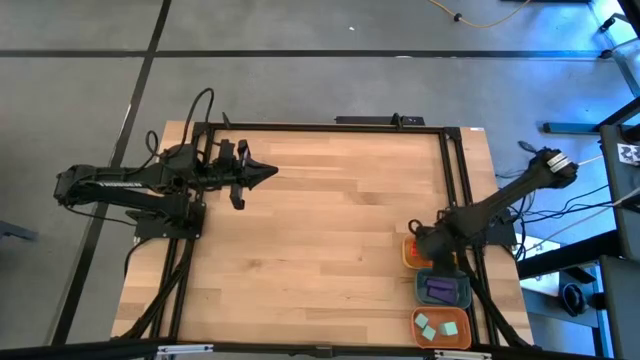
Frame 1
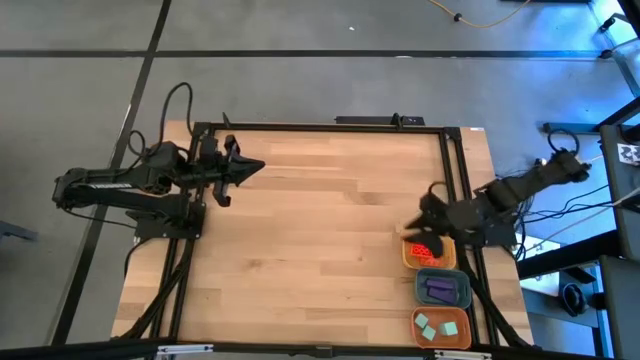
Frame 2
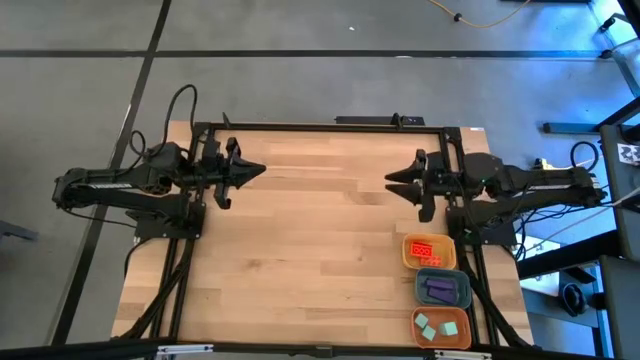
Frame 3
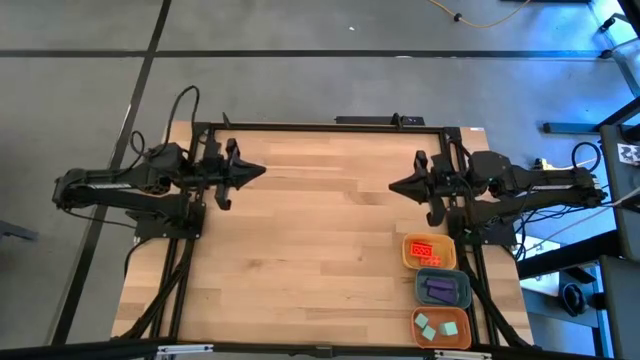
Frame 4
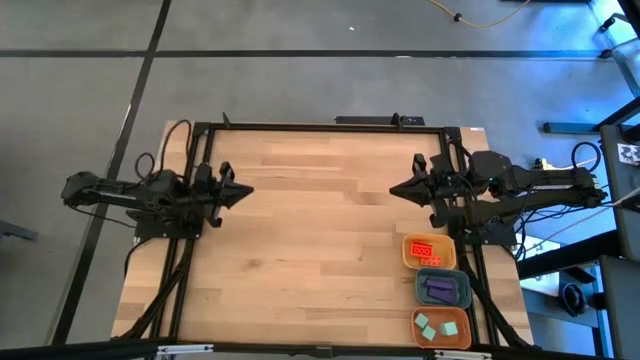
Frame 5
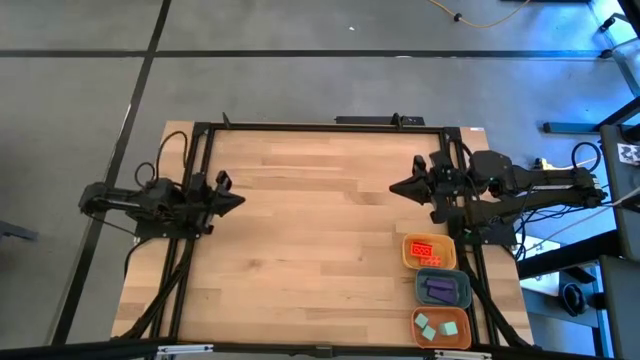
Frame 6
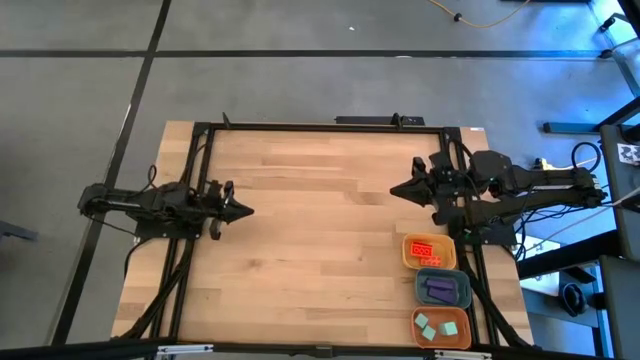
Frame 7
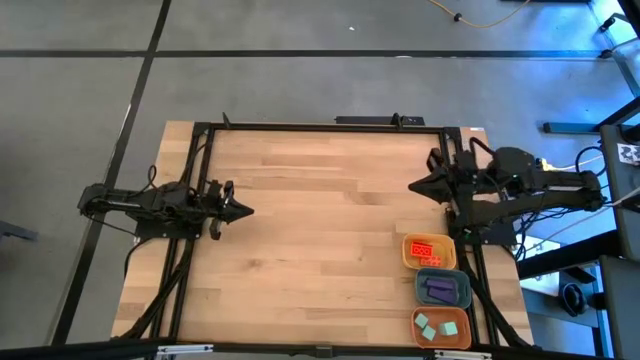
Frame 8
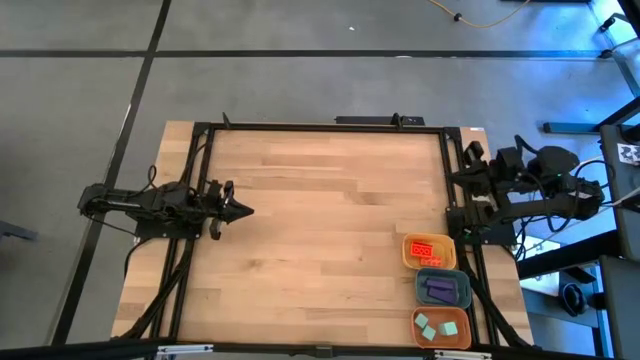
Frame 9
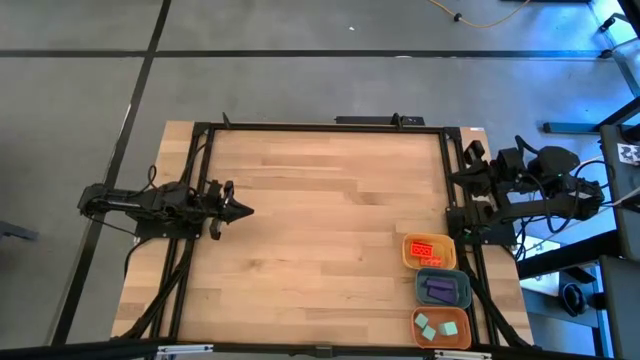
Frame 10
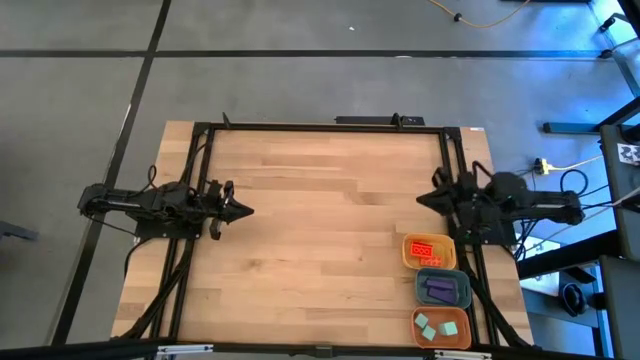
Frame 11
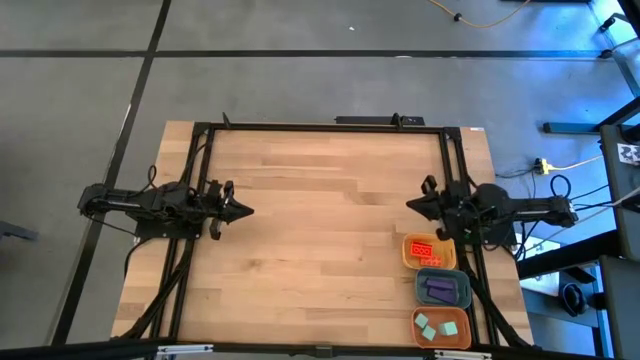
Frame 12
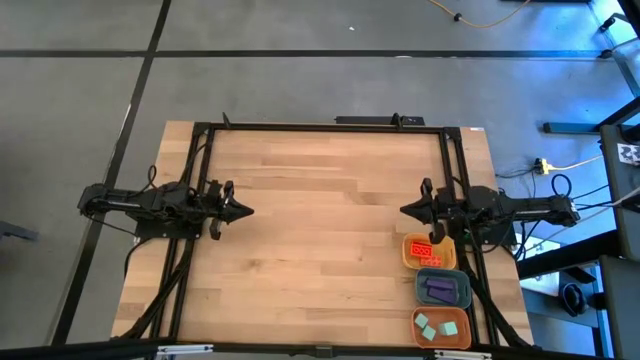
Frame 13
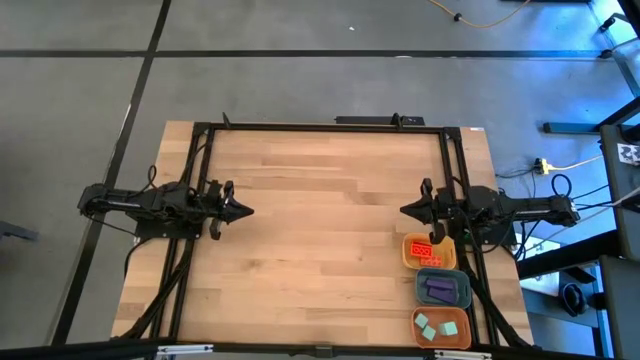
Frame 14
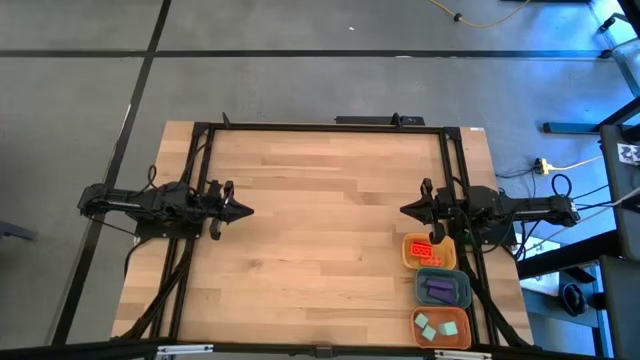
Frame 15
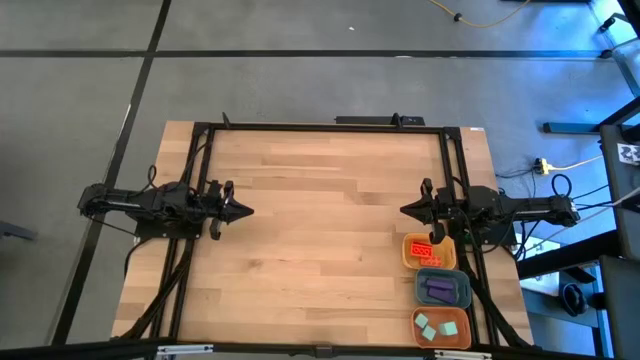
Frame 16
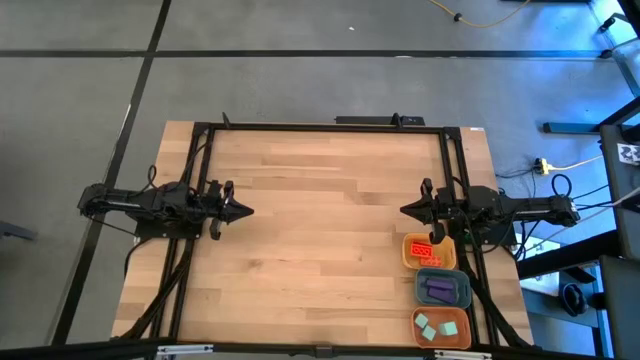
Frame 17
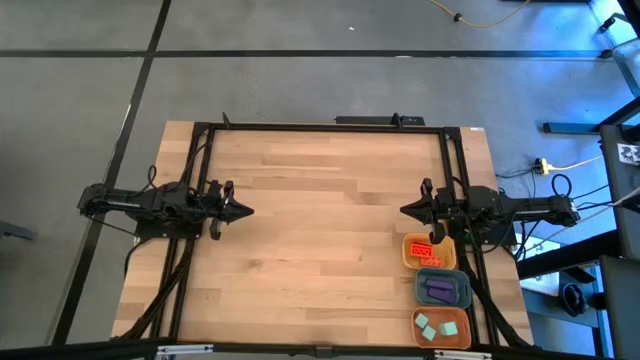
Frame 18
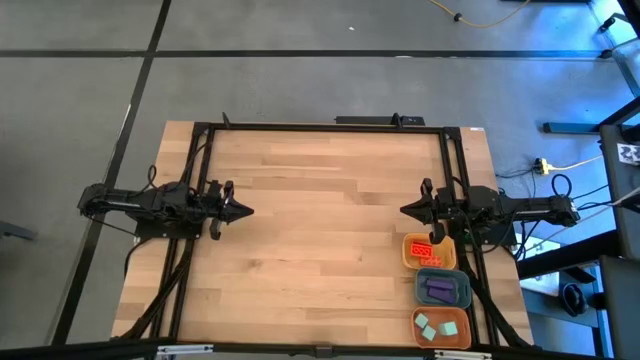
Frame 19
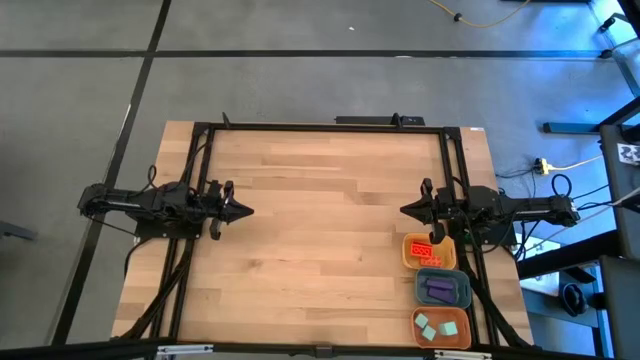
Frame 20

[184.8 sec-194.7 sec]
Task: Sort & place blocks by color
Return to Home Position

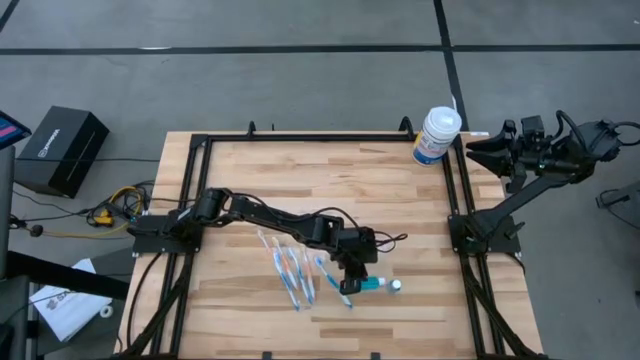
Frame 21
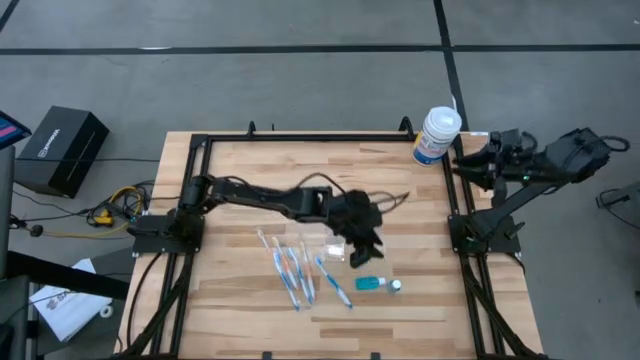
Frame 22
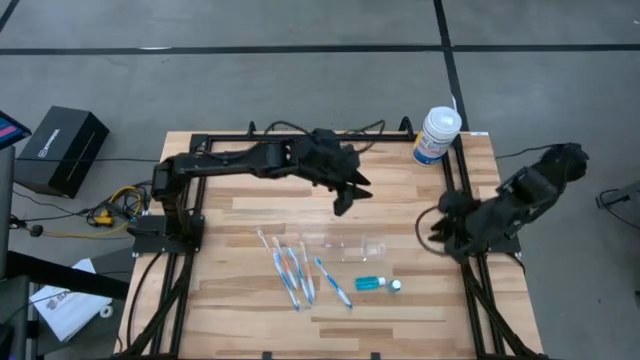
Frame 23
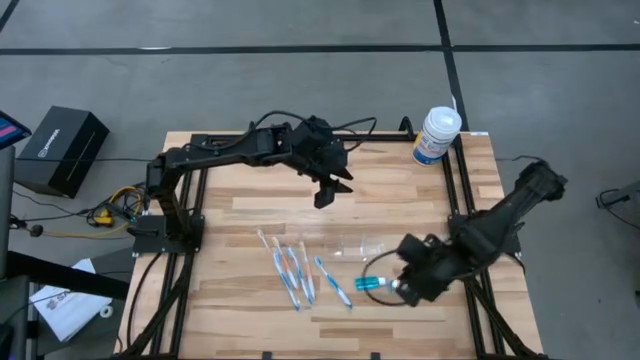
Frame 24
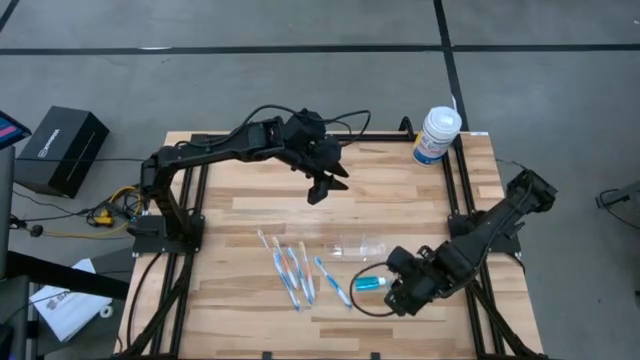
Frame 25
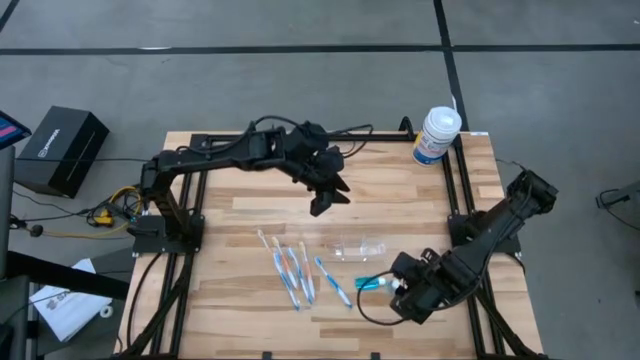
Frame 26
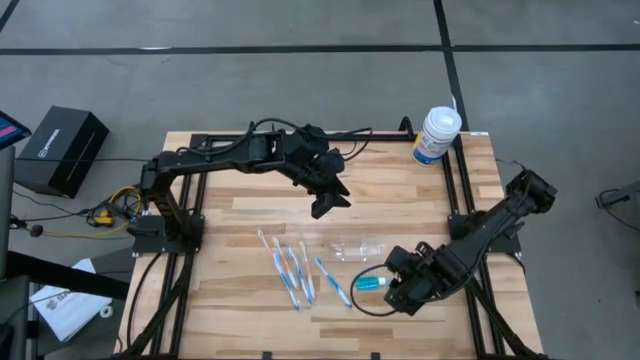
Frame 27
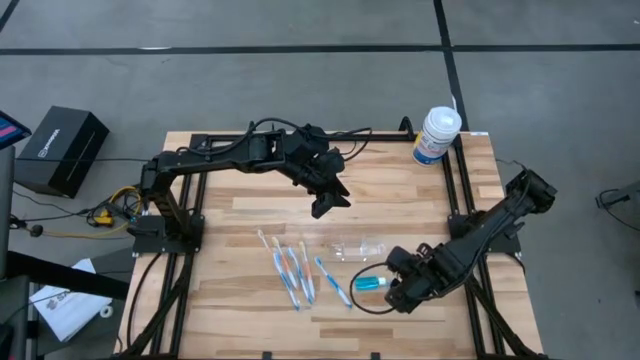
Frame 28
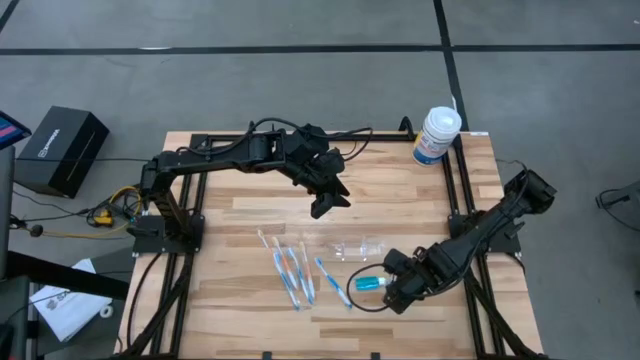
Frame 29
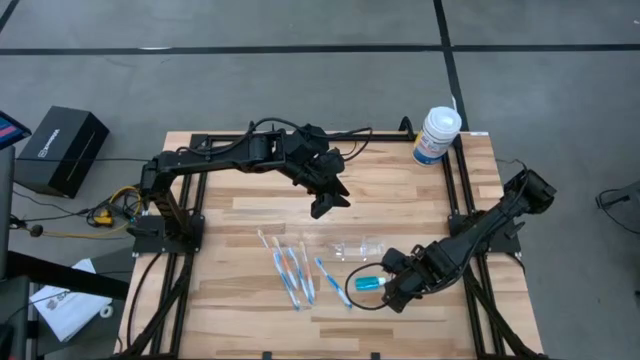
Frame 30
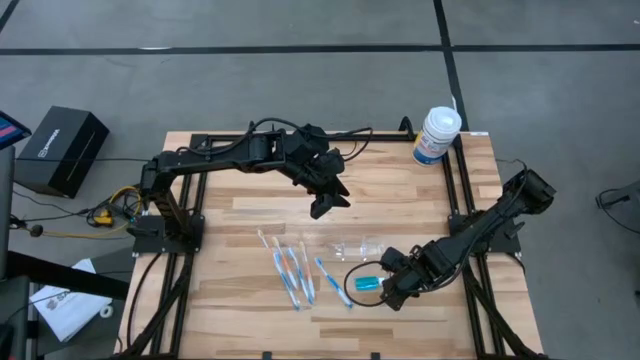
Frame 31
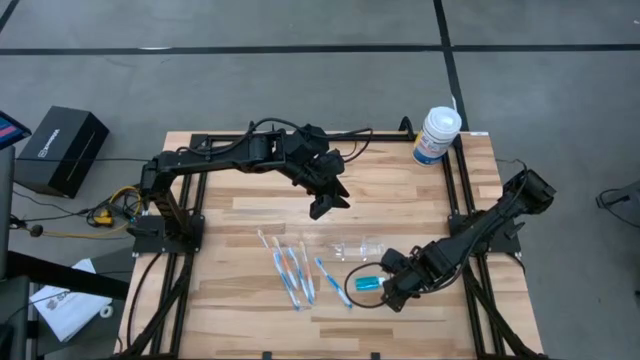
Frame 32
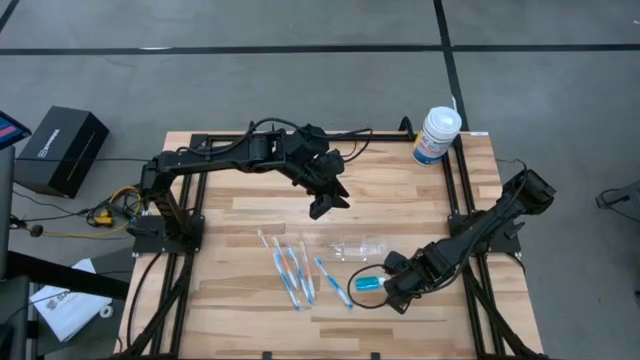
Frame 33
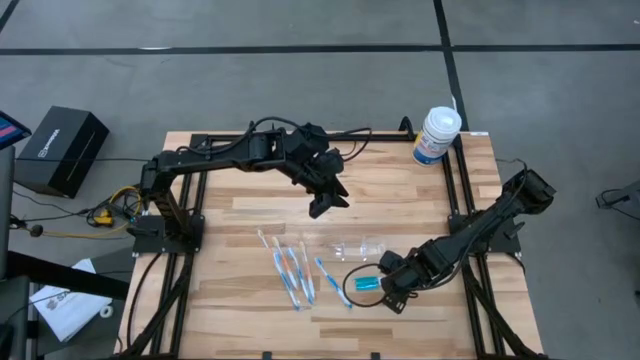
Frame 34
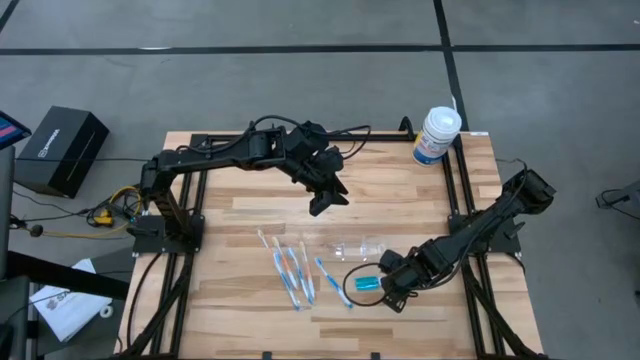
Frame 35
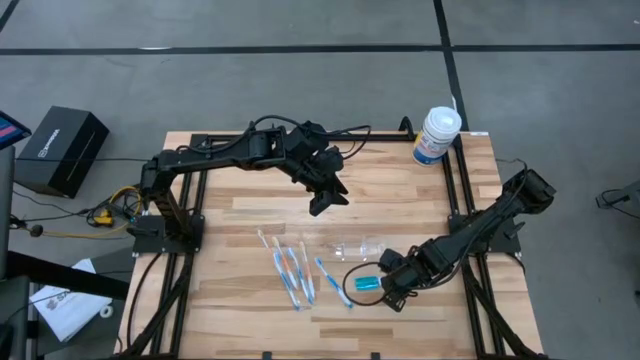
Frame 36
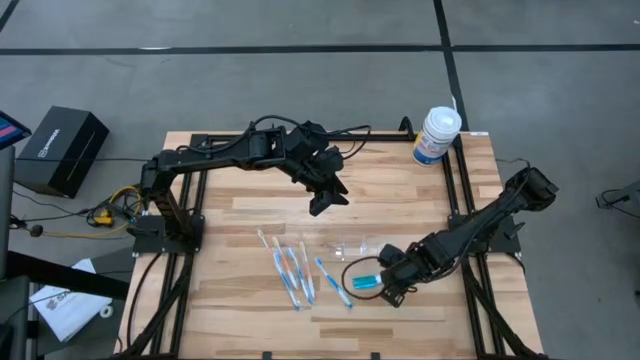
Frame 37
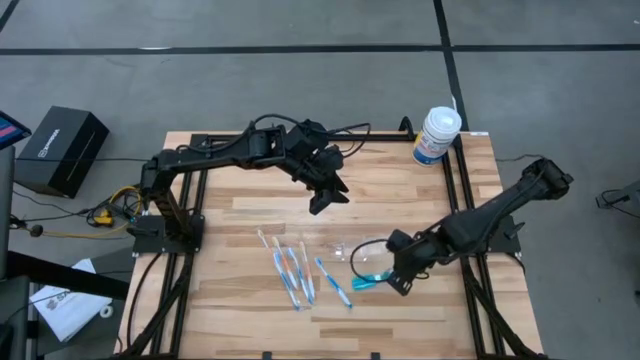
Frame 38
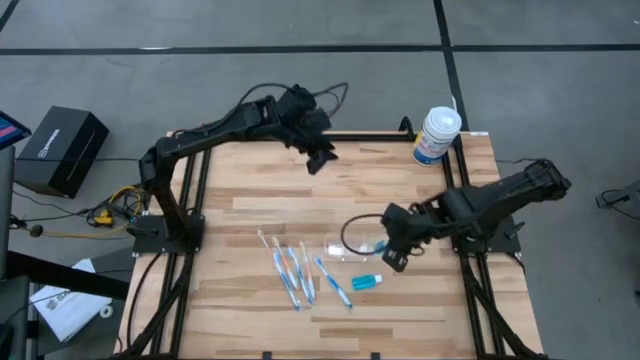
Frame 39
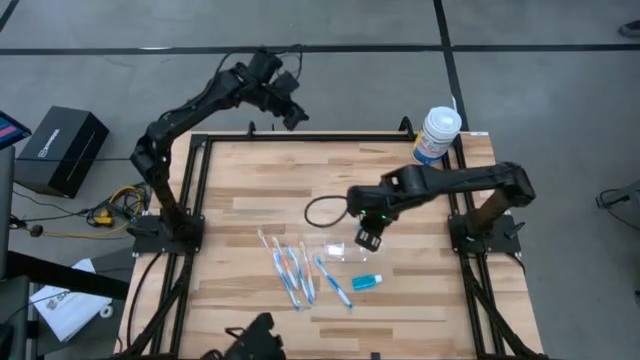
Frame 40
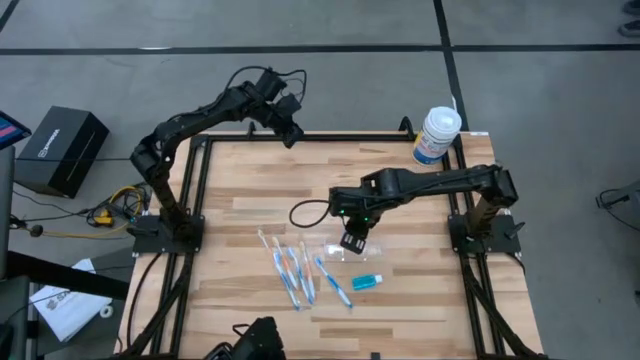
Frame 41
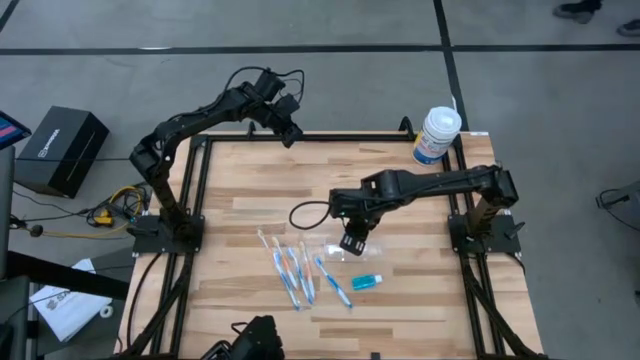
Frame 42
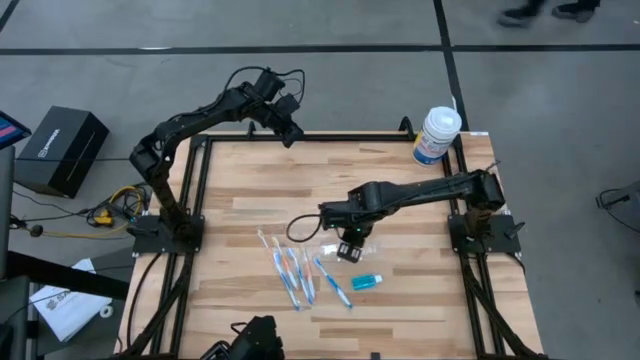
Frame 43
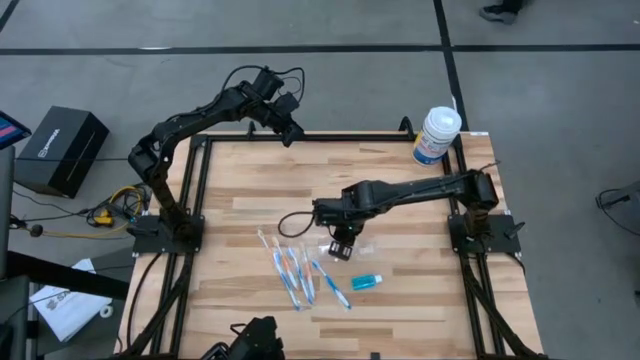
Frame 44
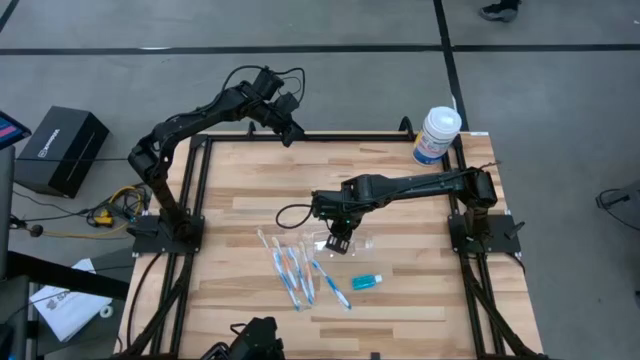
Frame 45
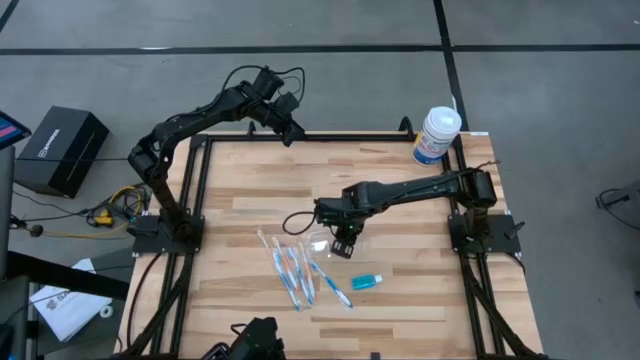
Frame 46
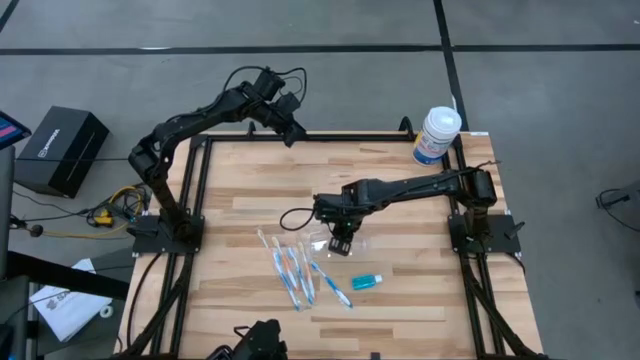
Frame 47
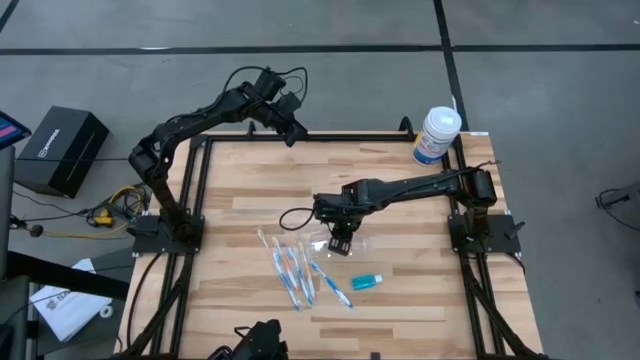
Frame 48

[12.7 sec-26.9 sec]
Task: Pick & Place toothbrushing station
Put the right blue mouthwash into the transparent organizer
